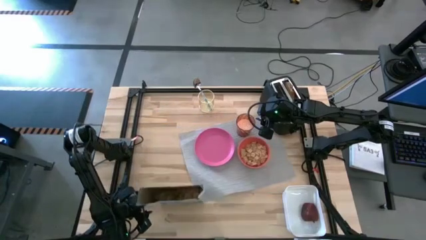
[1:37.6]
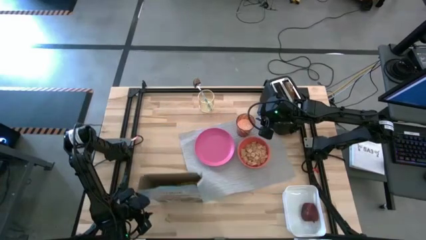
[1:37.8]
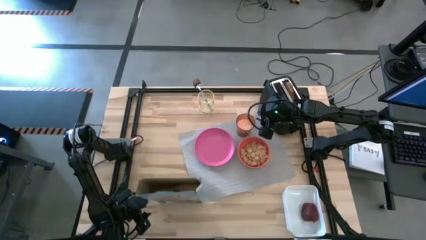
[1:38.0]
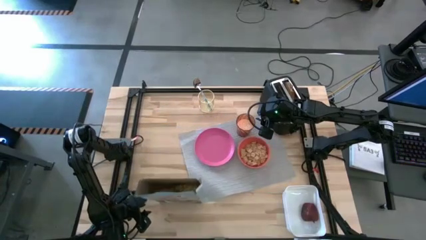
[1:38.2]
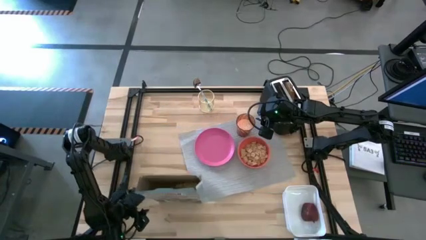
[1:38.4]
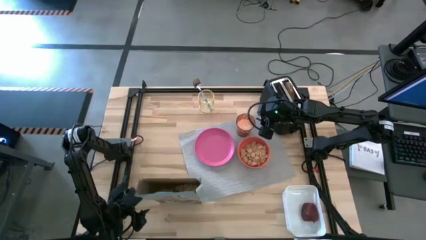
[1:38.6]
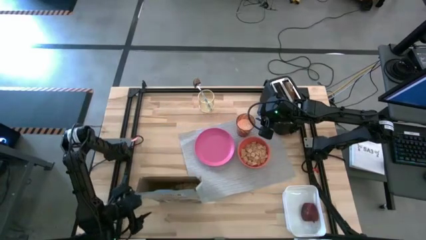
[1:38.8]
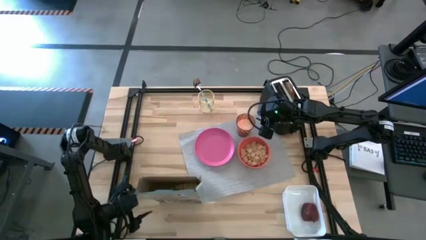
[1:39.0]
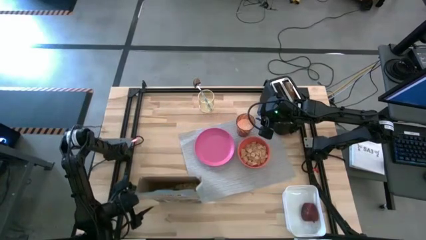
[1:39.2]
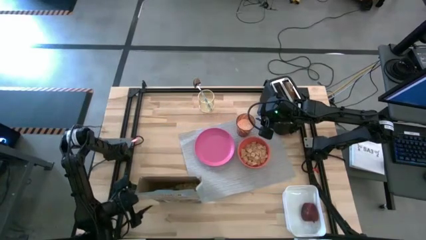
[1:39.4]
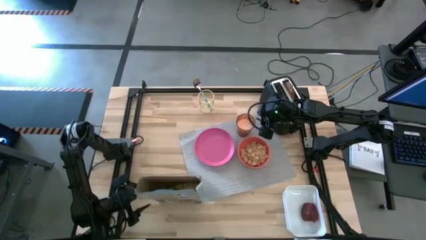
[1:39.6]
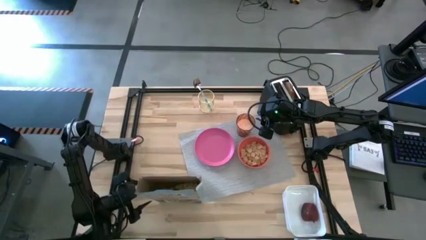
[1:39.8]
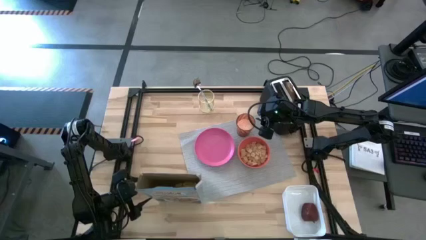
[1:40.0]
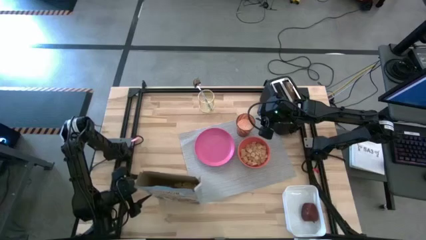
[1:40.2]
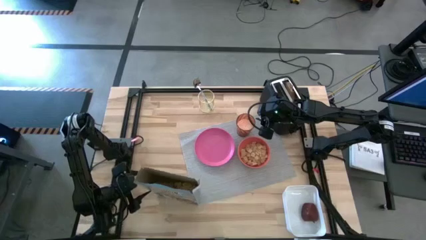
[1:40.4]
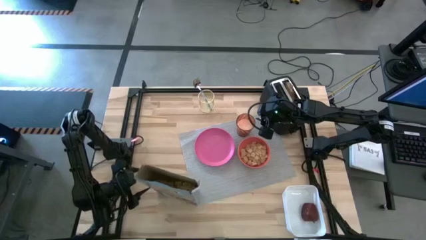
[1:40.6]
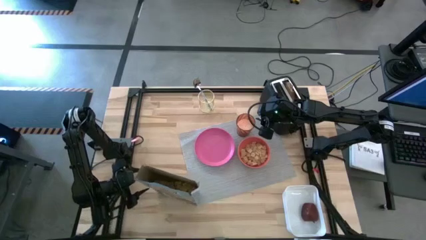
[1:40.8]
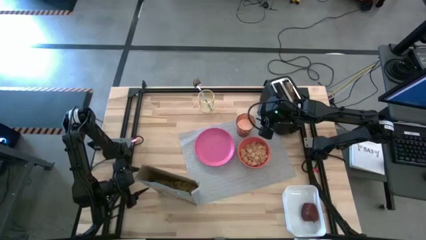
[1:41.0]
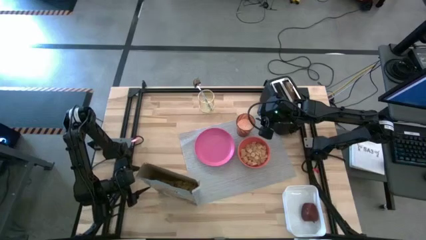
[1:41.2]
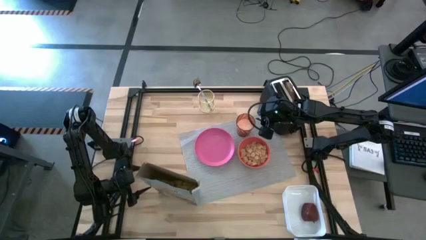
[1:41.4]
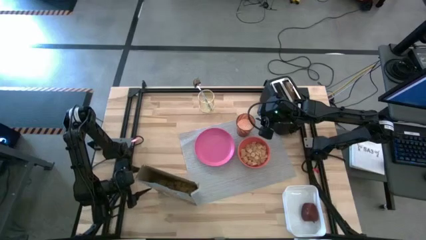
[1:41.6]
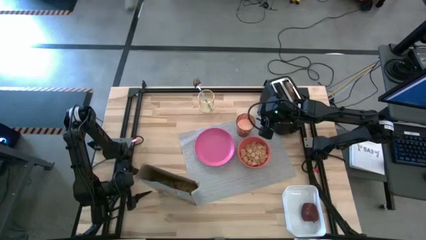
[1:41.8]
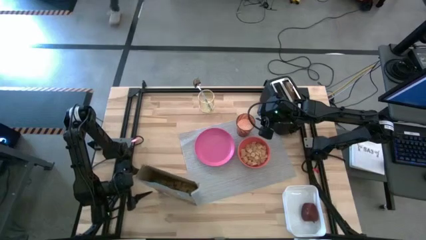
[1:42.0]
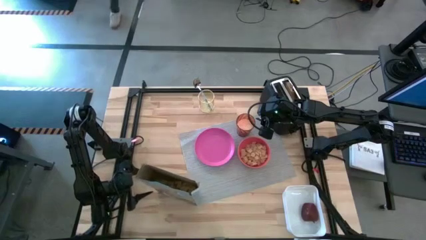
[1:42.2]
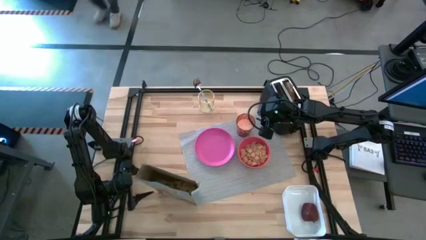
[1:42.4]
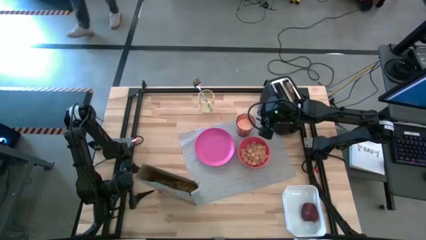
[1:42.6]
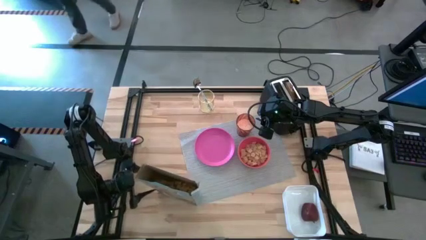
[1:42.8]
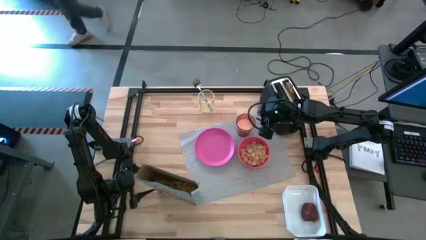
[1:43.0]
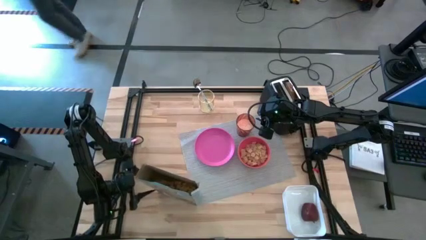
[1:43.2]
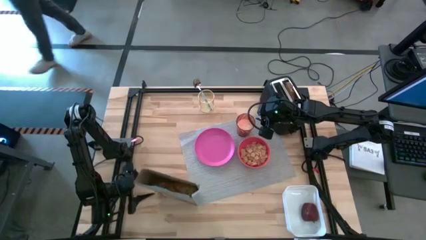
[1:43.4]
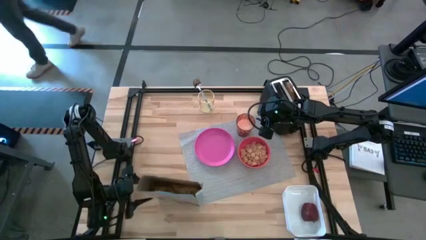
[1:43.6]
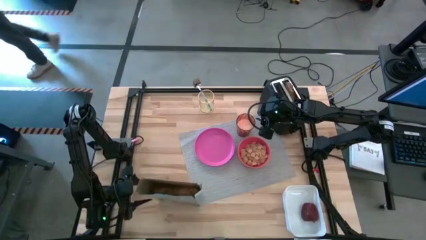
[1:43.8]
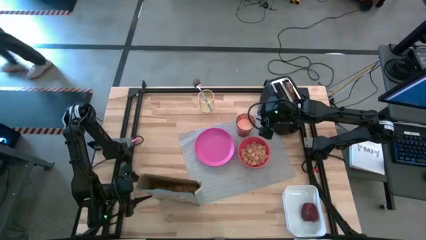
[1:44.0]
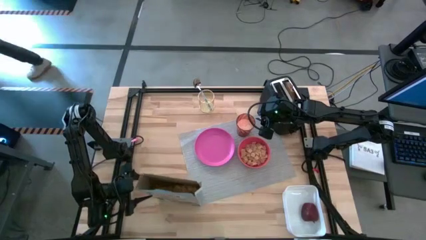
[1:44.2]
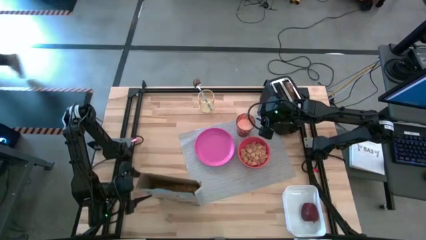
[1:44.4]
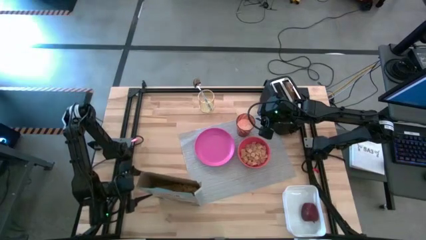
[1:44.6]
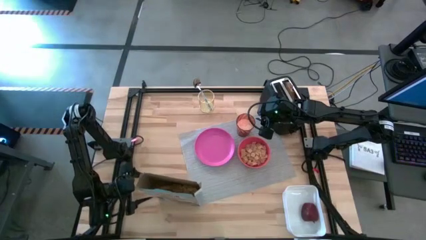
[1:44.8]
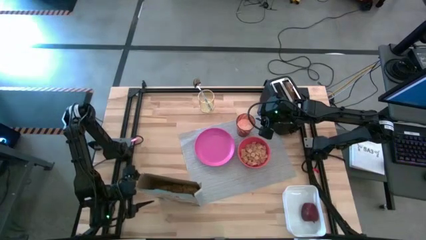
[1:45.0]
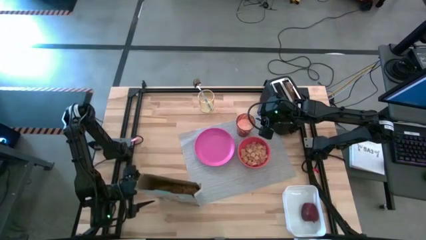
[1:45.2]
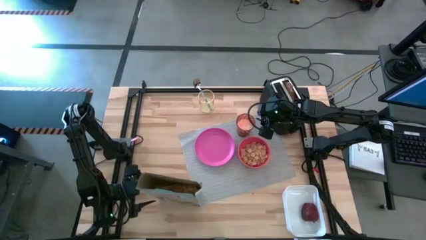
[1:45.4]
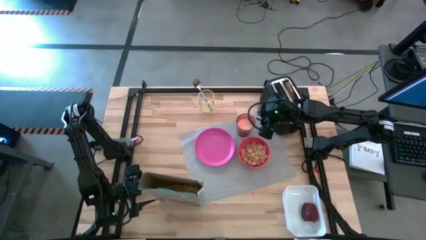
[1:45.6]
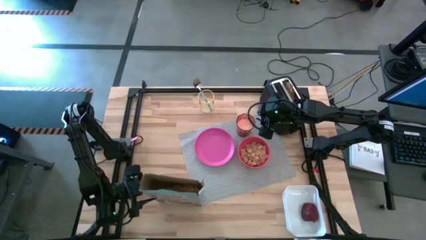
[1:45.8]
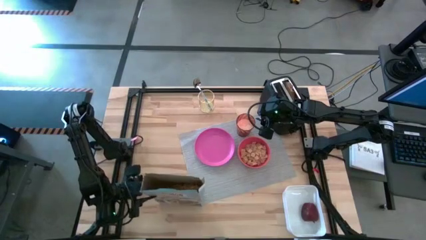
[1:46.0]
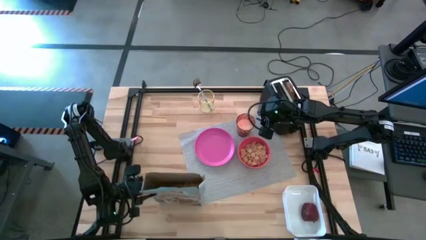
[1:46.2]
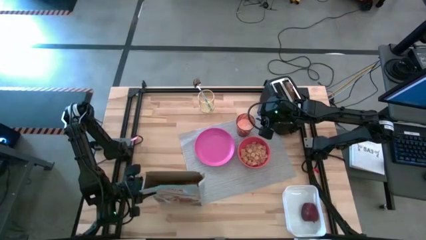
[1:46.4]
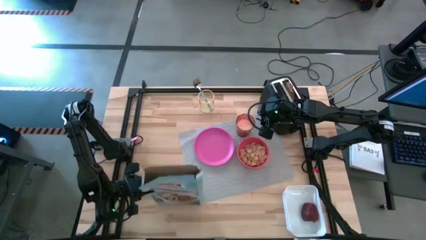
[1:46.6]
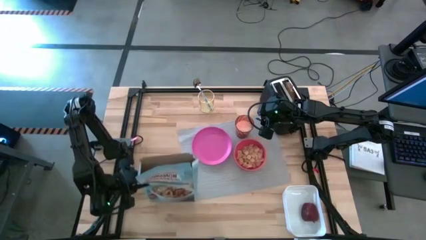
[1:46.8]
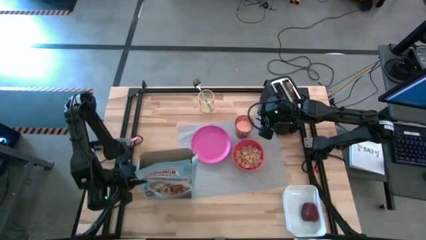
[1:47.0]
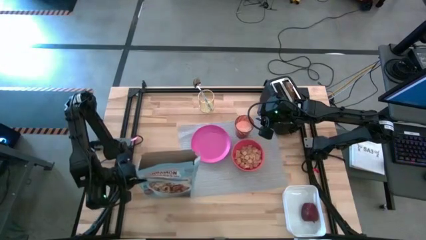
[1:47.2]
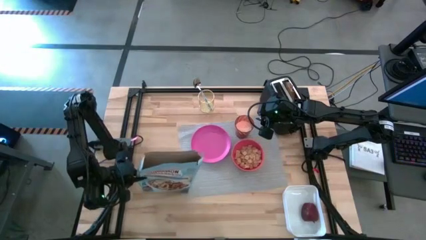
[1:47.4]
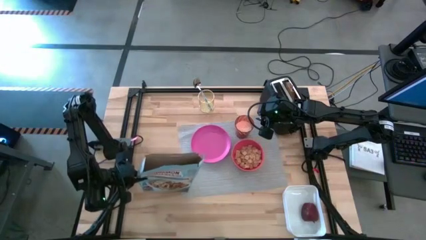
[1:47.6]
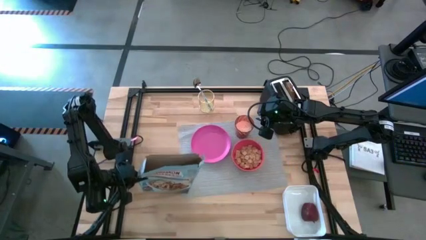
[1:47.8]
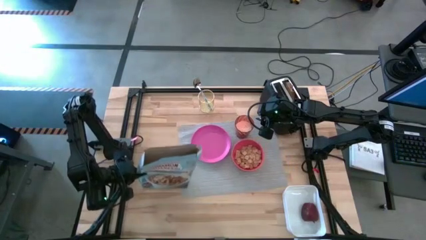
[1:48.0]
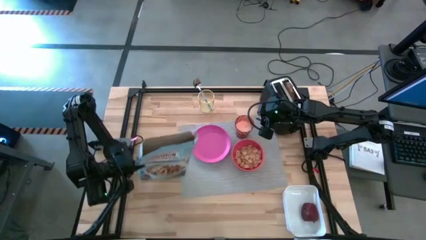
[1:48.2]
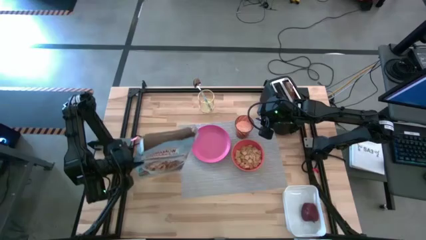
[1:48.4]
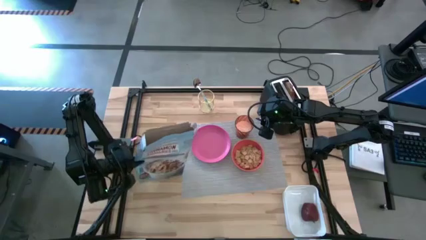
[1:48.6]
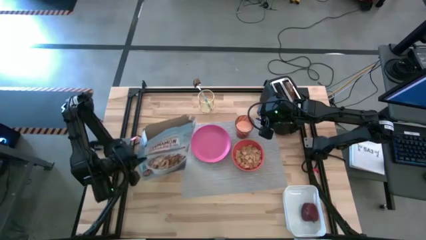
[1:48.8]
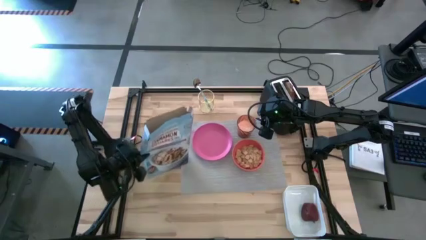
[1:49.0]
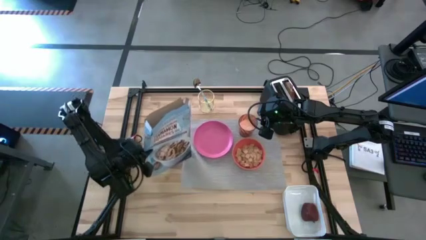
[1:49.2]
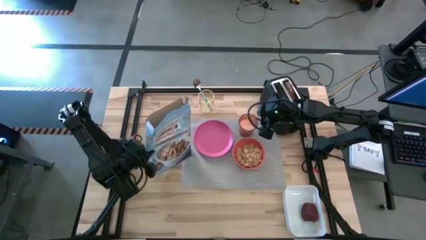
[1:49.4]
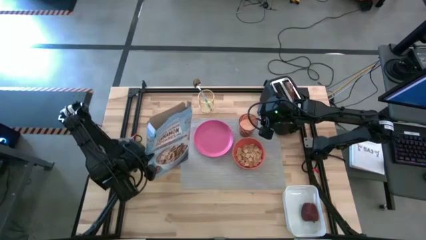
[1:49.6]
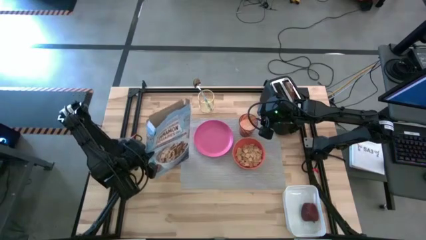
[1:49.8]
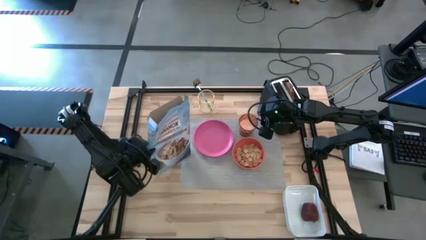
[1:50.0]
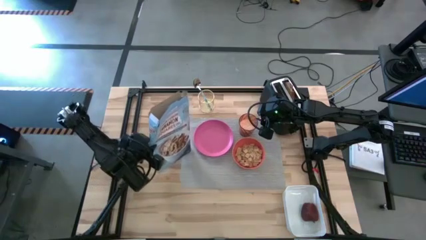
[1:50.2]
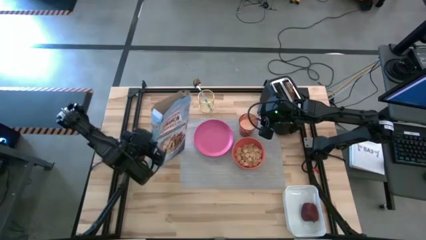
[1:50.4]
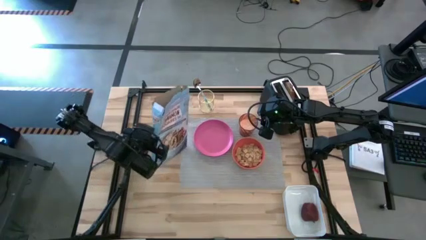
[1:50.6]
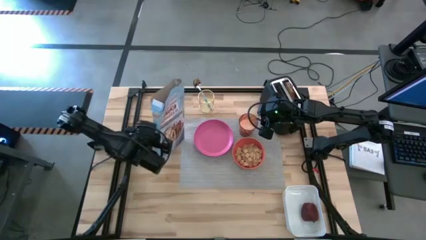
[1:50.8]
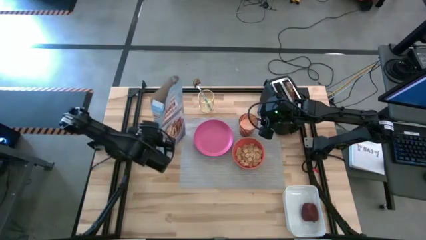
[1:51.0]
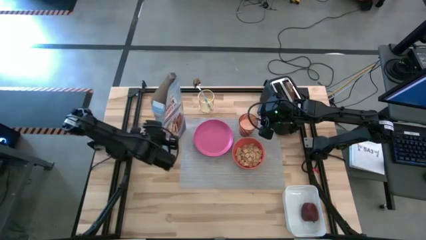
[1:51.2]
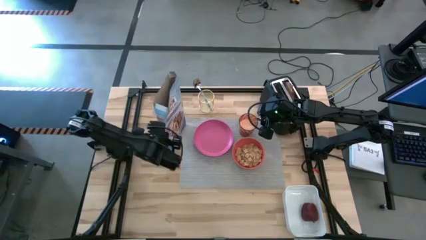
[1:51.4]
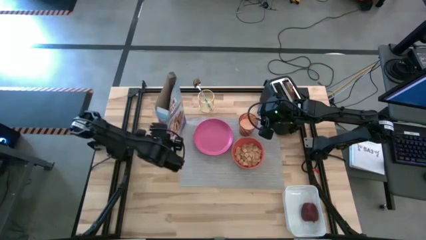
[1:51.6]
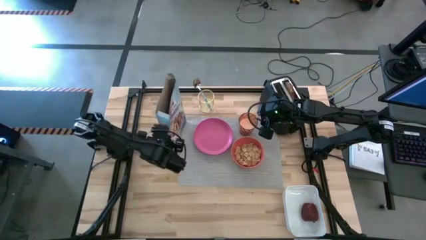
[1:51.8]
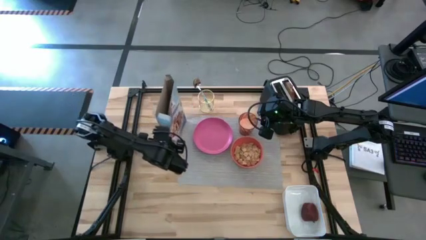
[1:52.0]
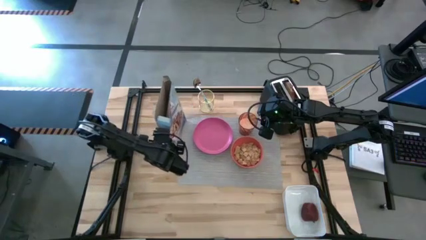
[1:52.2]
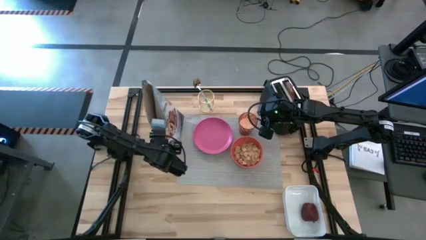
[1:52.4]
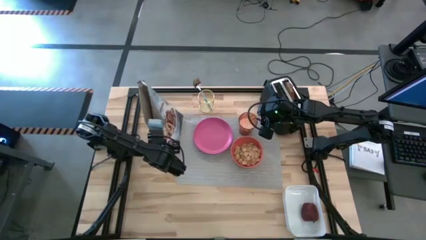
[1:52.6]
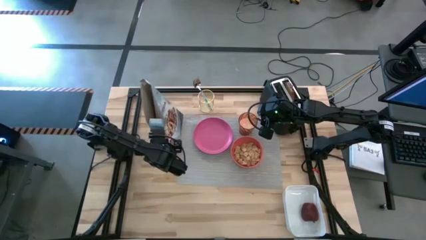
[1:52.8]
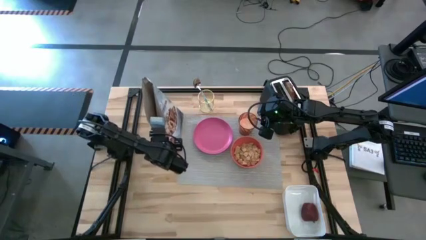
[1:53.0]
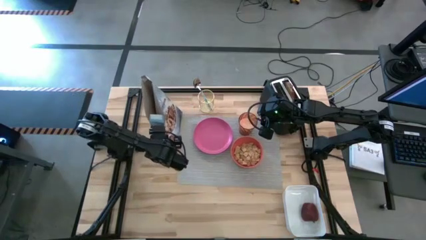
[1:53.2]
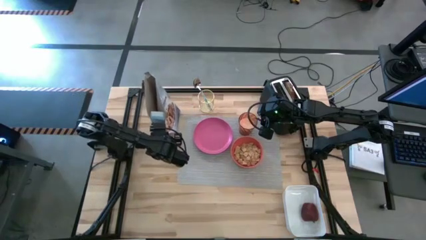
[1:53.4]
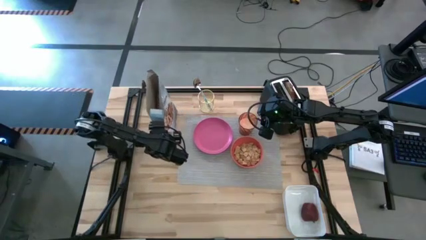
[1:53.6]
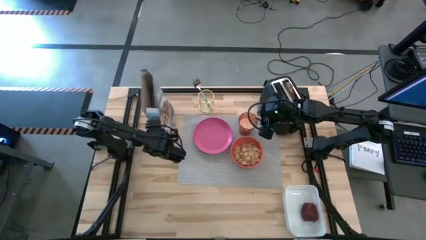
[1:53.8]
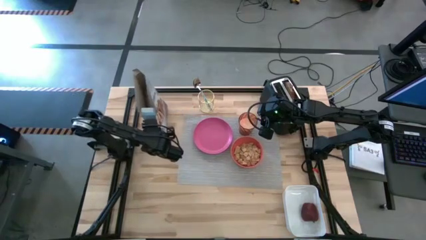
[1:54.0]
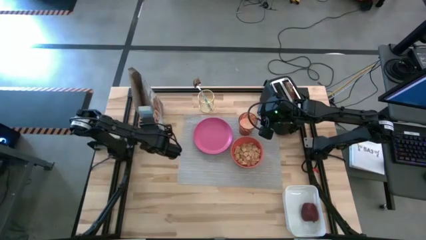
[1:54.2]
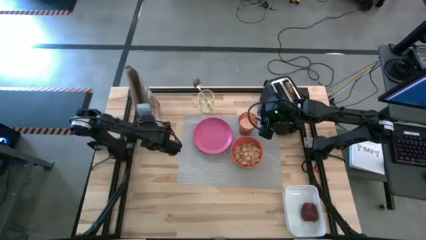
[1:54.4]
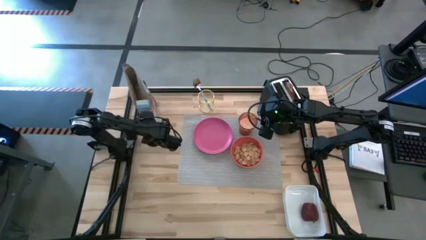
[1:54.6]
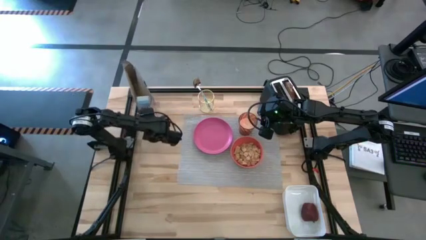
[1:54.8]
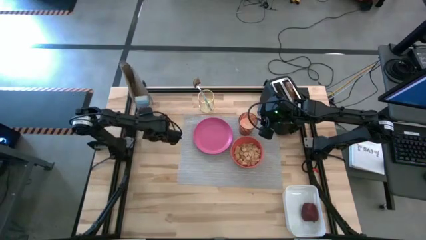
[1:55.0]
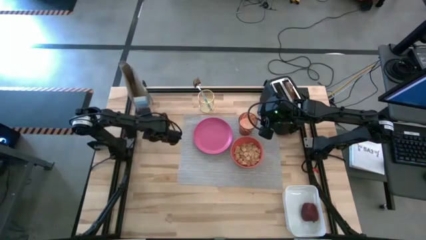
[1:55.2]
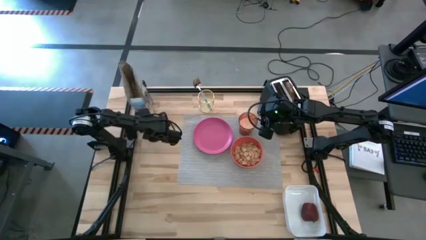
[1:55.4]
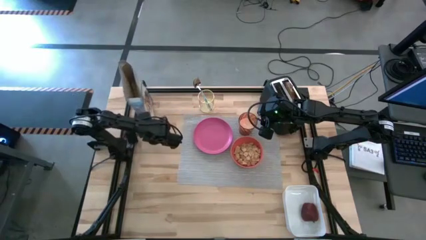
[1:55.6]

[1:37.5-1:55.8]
Task: Arrange a breakfast setting
Move the cereals to the top left of the table
